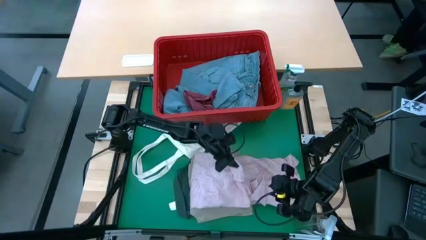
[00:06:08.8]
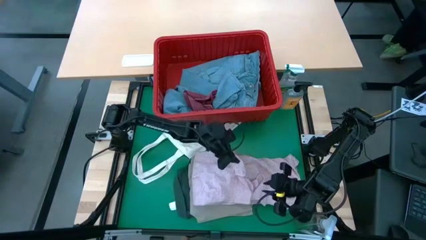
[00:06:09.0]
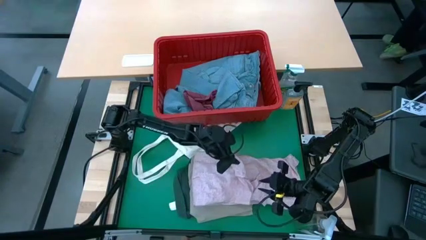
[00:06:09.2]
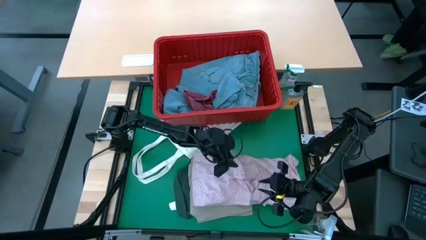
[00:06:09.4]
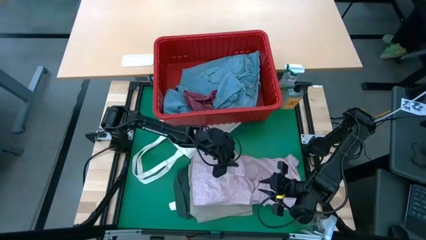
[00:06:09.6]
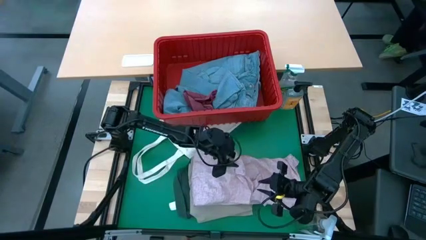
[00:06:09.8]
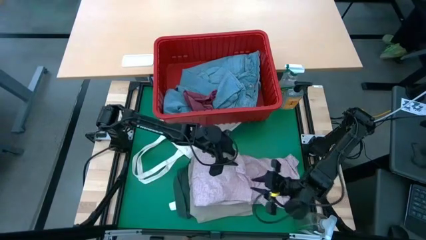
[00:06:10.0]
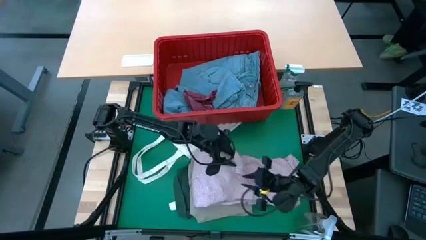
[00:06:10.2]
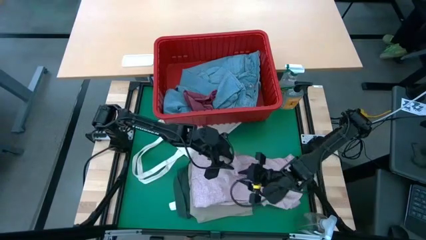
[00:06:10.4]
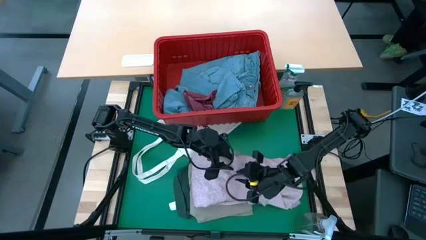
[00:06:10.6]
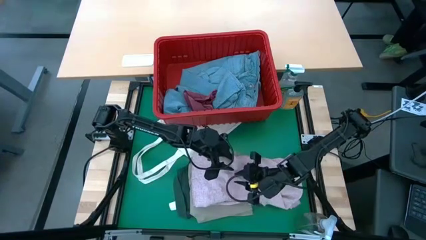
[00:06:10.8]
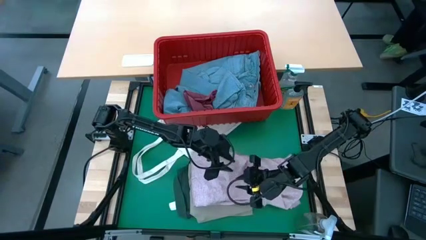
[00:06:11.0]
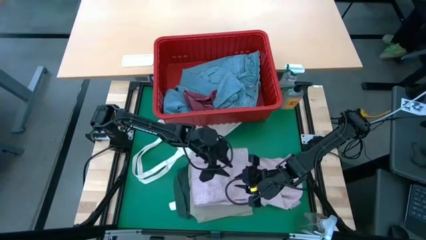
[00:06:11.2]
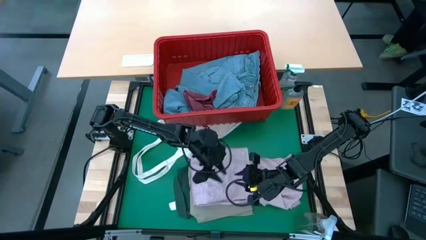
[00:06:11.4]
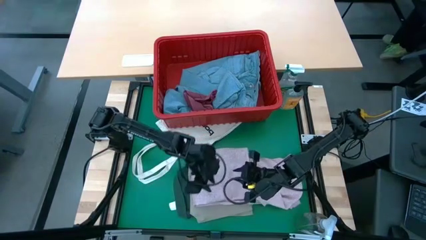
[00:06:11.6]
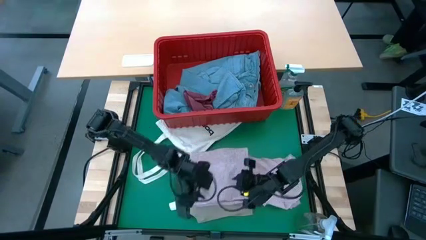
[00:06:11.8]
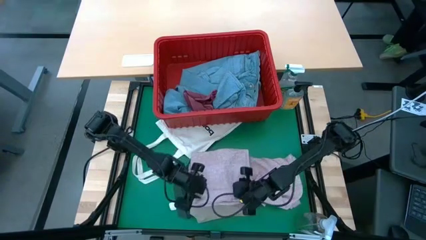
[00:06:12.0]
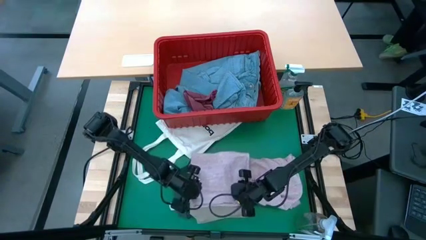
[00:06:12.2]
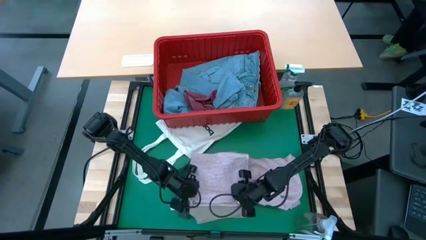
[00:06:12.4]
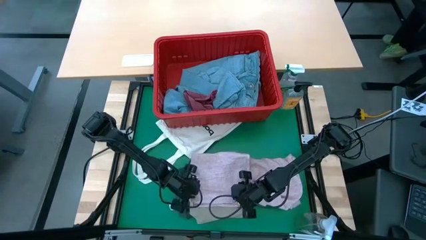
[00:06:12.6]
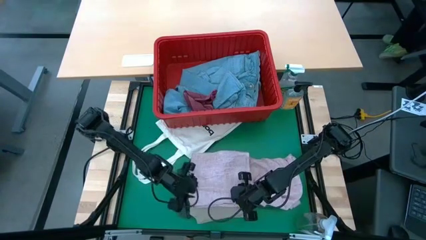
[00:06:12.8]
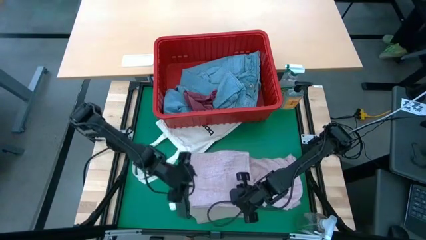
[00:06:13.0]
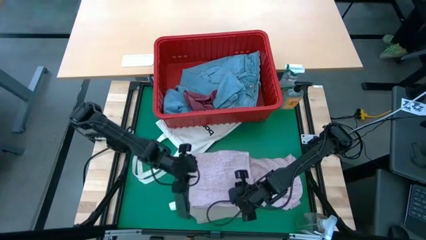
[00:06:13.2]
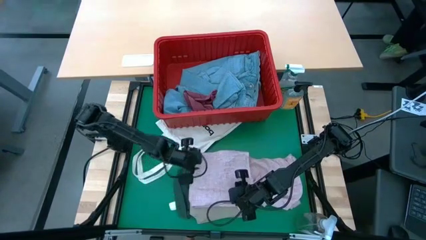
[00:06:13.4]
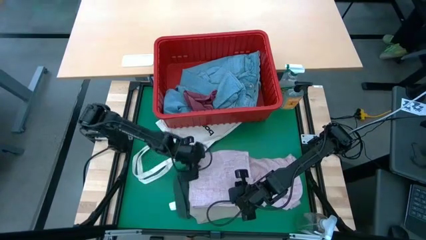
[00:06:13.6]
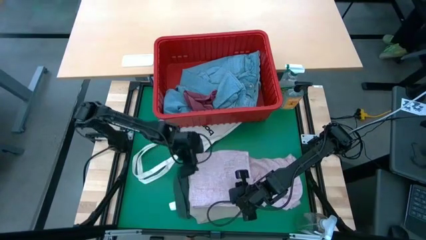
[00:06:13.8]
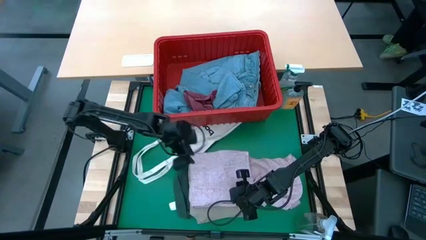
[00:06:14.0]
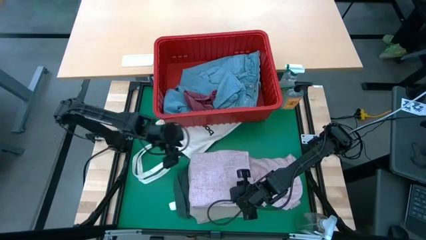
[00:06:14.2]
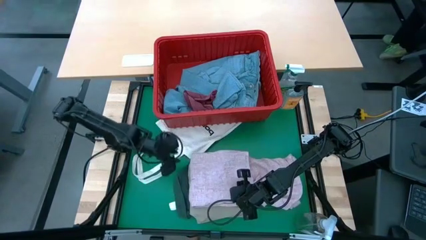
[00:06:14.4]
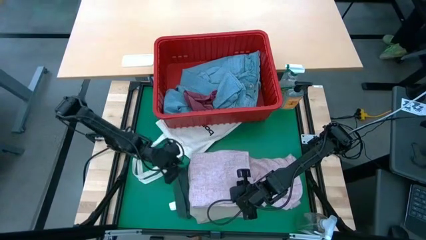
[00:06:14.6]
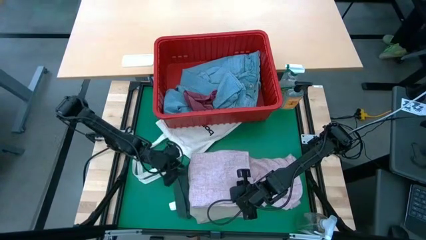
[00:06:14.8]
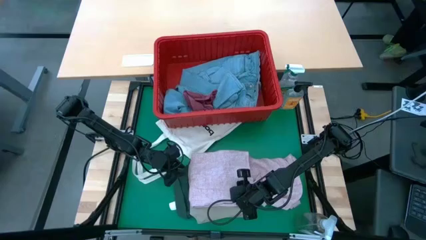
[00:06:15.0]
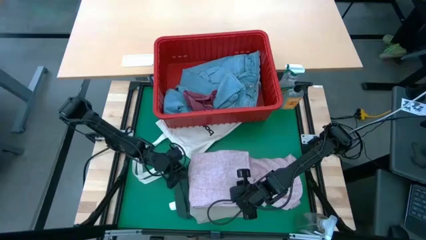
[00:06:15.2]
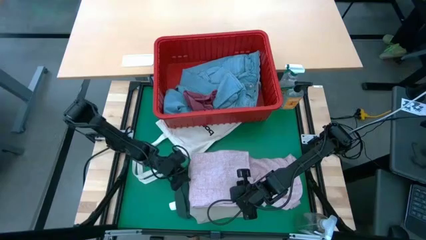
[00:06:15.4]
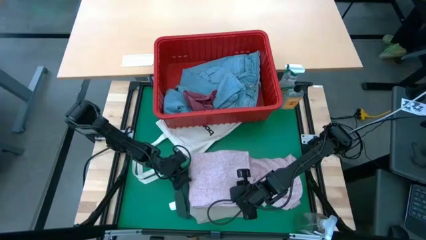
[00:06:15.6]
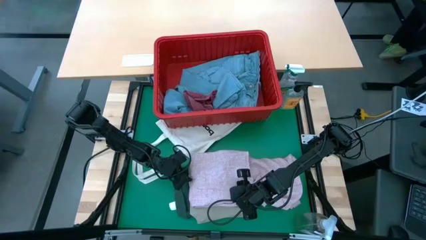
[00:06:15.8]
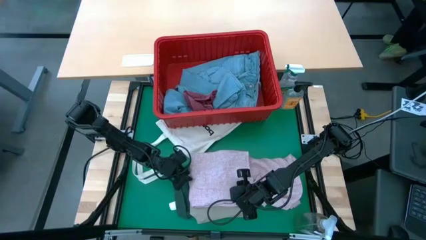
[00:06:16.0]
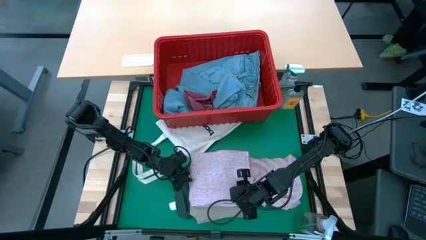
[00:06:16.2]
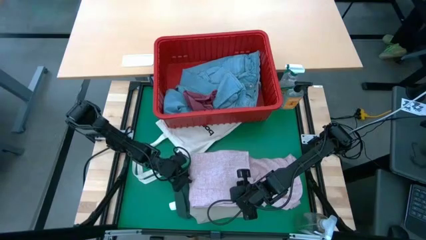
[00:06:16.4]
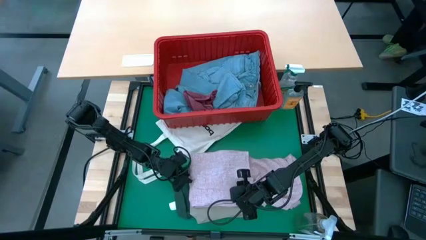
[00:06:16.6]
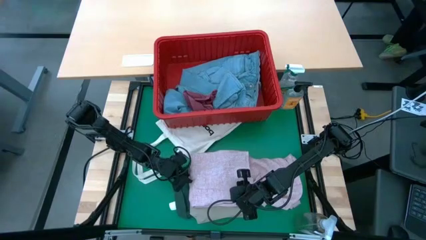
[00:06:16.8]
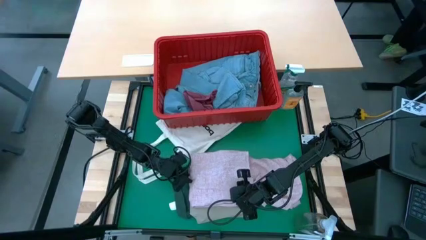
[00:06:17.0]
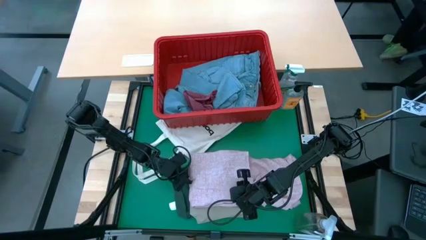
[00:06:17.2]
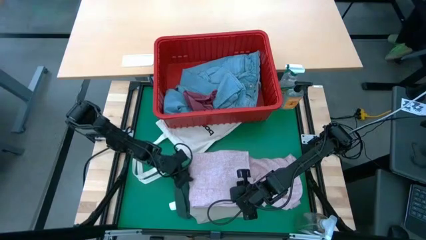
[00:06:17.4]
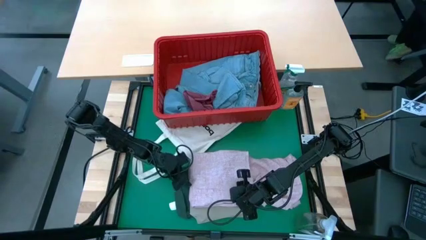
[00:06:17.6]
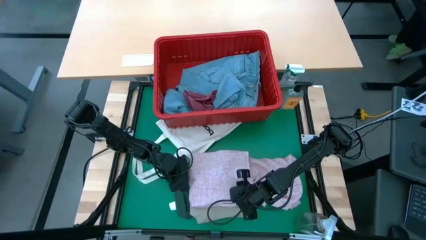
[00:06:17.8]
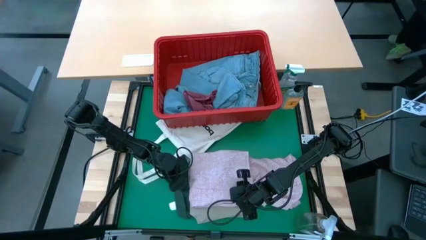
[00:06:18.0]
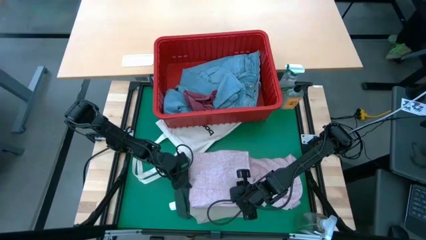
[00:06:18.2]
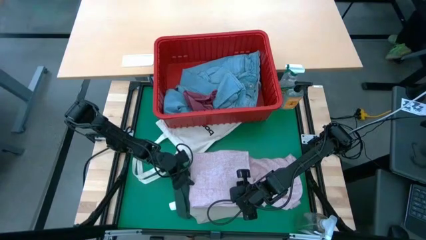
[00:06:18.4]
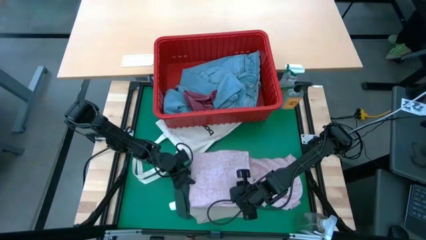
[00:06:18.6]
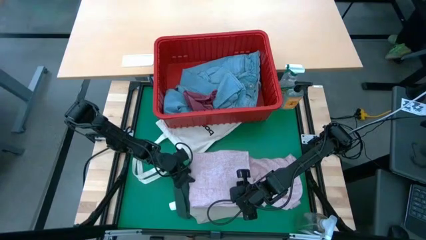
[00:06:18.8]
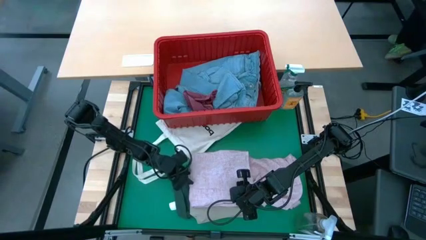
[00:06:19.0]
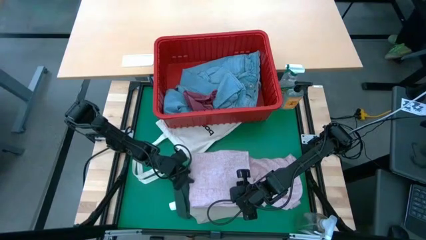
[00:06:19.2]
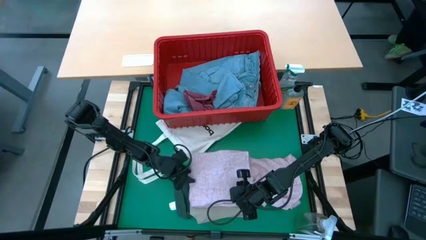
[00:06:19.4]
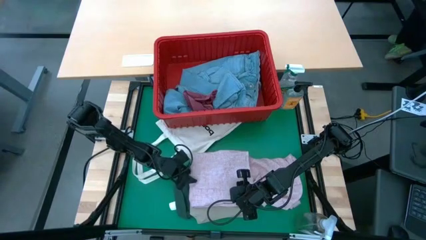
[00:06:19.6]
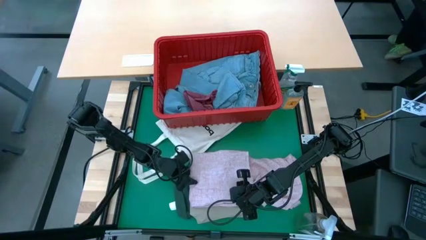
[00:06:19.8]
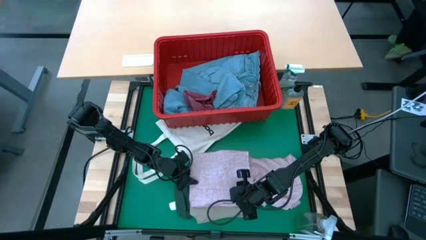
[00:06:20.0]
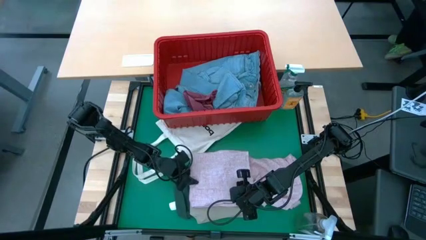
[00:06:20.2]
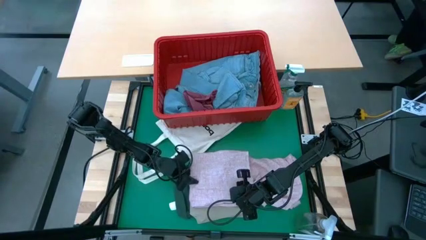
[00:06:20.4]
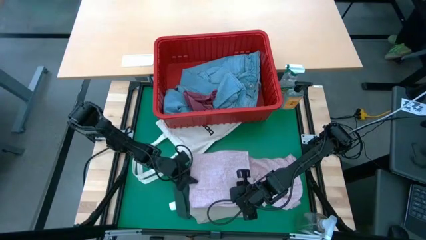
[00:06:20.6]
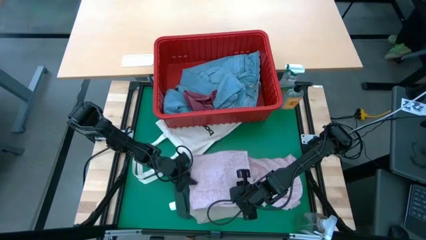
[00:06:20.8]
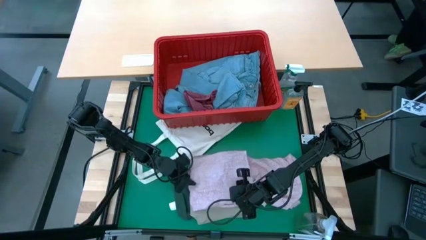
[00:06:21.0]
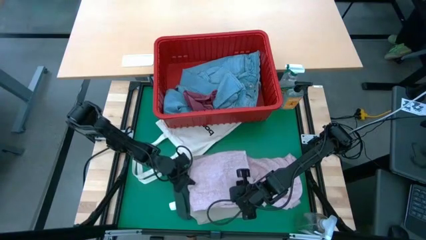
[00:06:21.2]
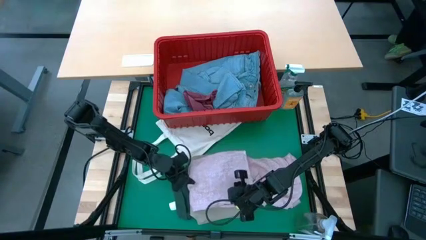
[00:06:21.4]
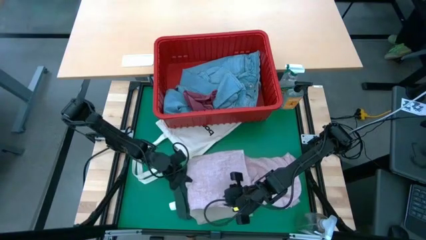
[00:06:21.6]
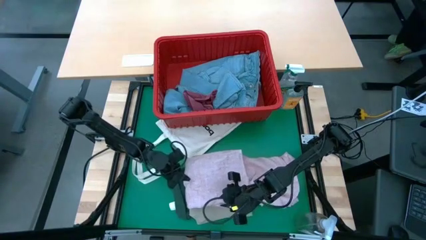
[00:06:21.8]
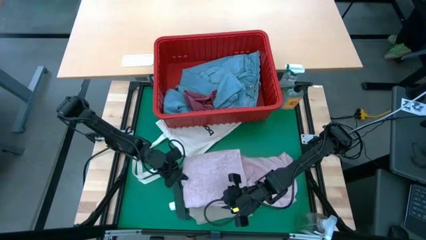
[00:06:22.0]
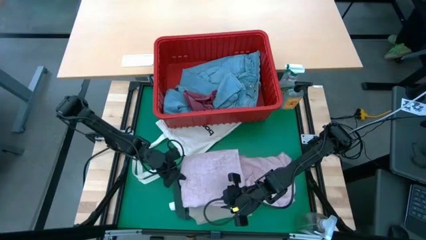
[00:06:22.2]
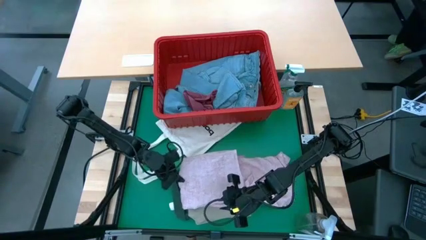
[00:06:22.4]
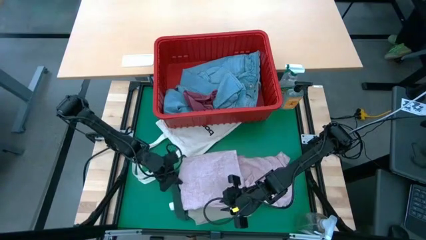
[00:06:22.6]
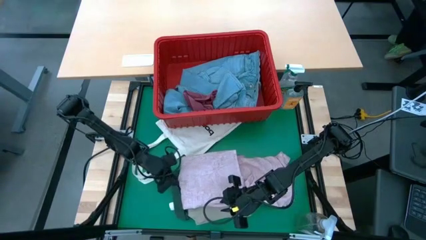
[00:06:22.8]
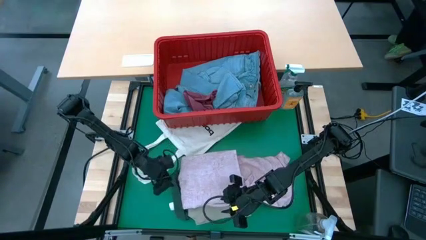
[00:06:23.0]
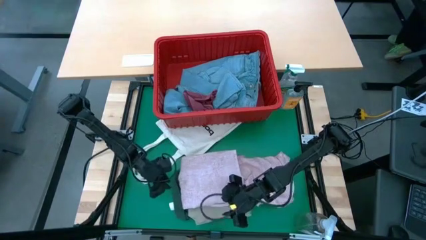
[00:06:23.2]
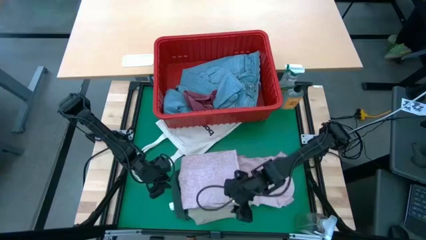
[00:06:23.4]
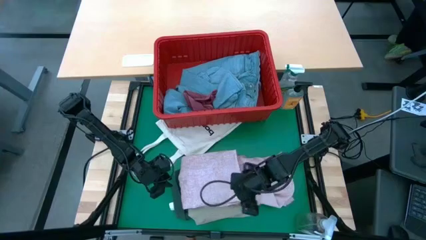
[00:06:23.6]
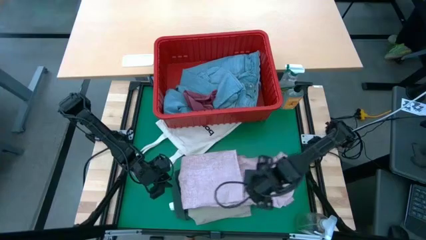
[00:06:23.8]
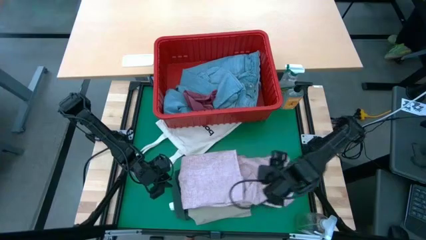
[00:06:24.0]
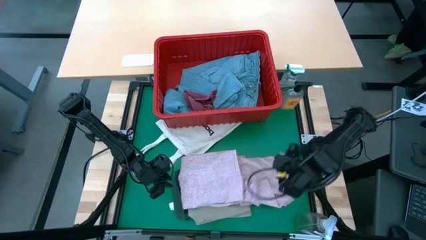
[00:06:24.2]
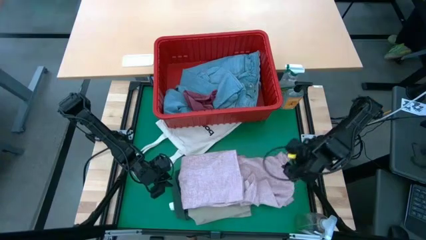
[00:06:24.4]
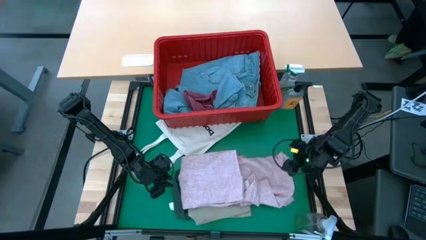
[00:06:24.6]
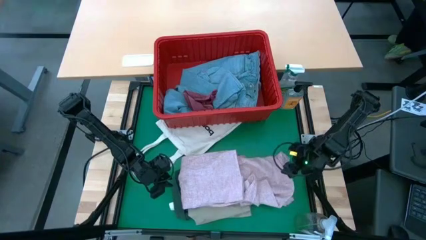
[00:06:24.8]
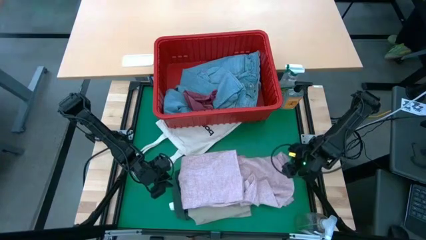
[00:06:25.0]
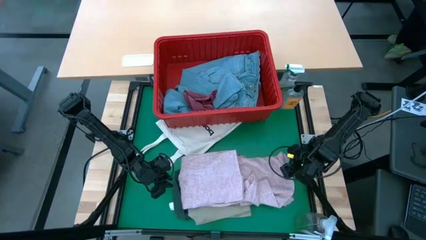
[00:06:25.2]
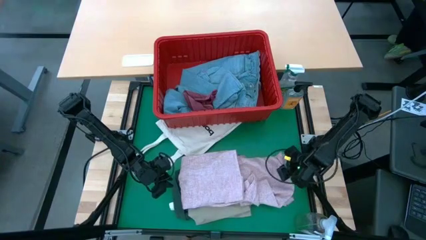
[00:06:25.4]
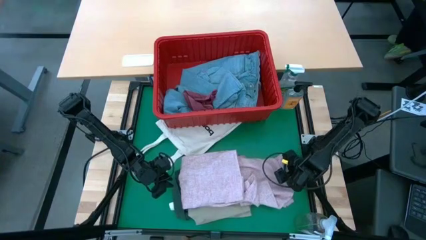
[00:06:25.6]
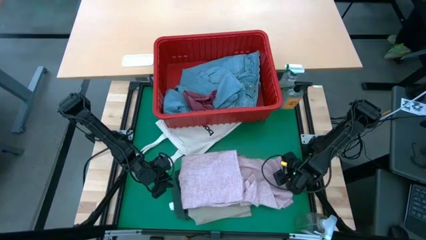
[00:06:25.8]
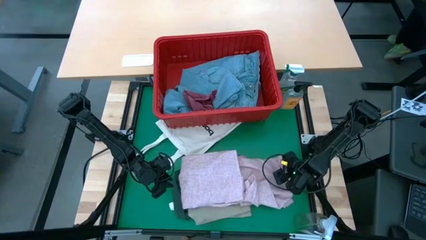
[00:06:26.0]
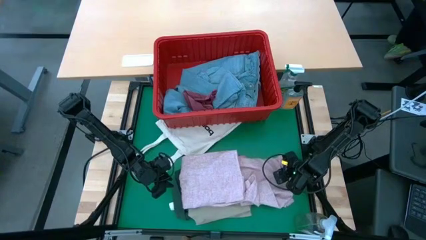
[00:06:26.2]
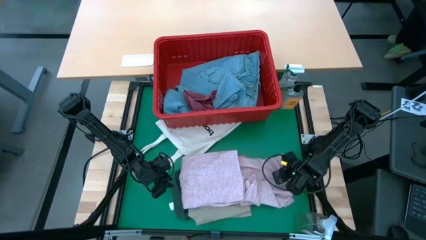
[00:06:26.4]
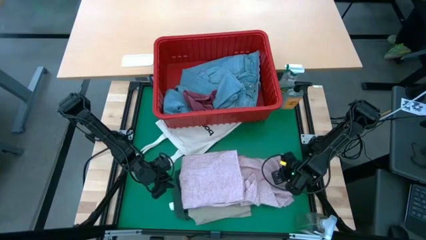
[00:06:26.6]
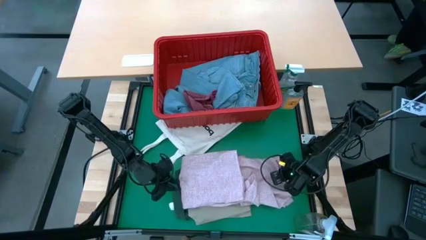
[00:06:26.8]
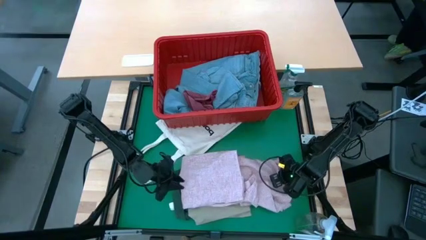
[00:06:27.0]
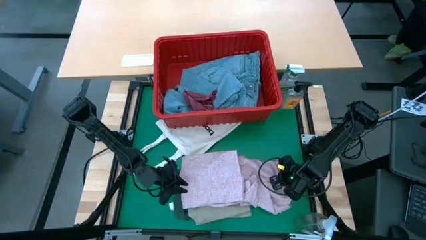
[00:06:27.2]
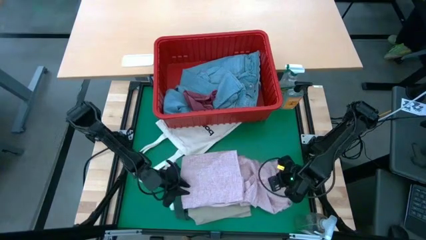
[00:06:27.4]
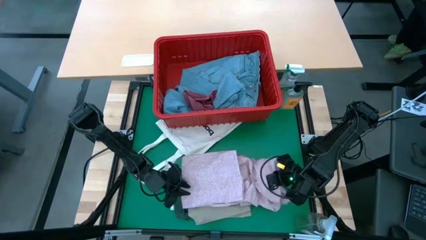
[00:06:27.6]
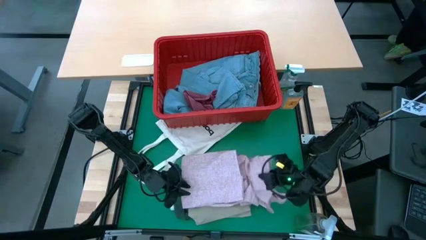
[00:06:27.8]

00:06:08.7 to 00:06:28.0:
Task: Fold laundry
Fold the pink shirt
